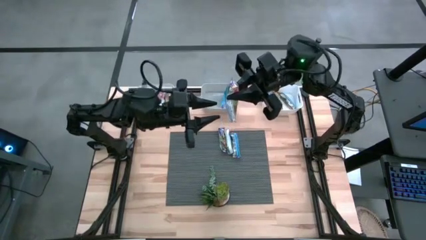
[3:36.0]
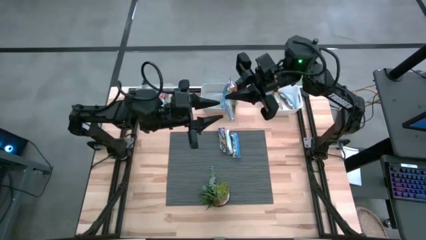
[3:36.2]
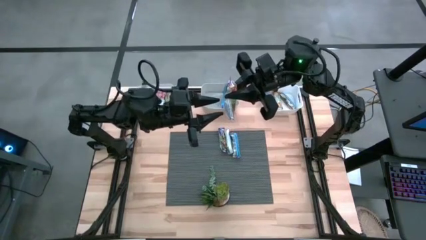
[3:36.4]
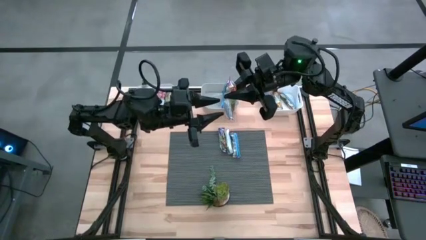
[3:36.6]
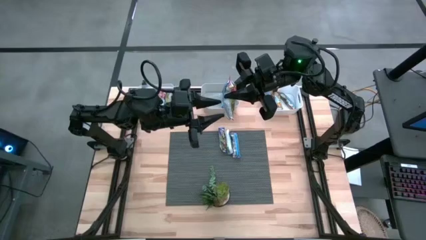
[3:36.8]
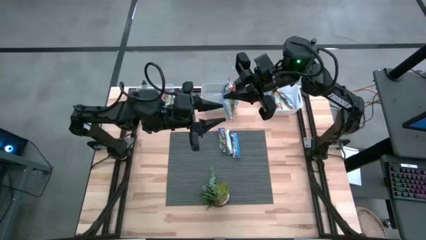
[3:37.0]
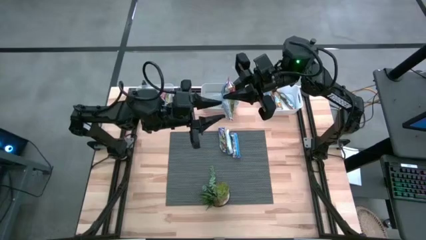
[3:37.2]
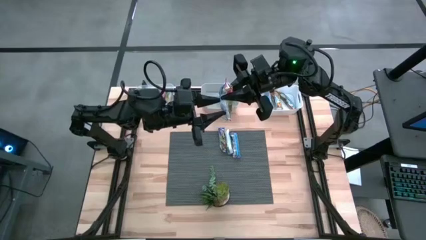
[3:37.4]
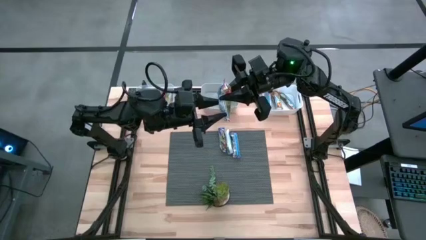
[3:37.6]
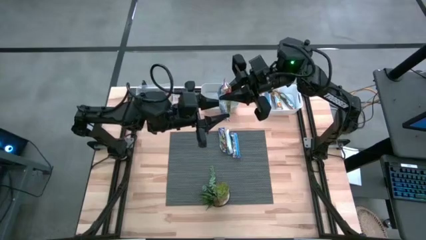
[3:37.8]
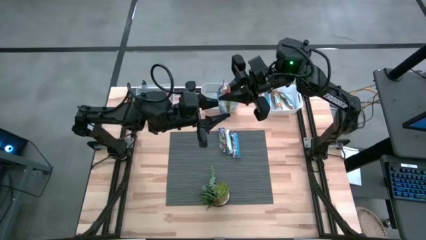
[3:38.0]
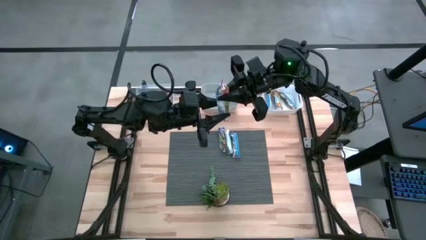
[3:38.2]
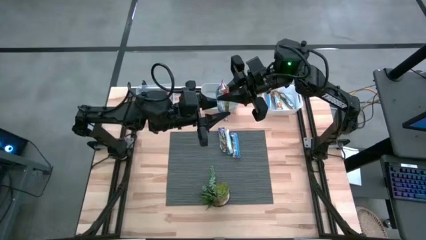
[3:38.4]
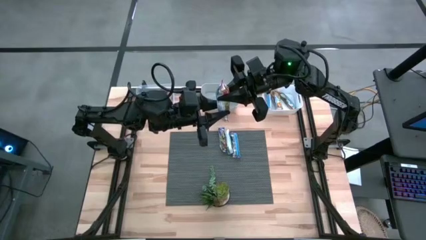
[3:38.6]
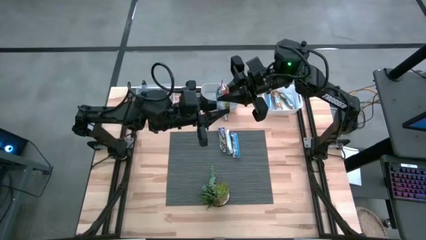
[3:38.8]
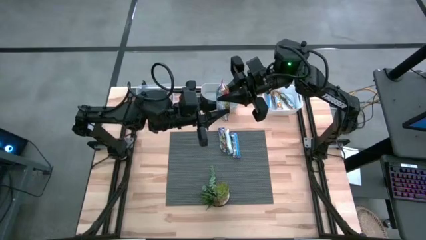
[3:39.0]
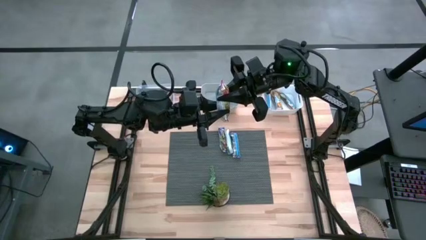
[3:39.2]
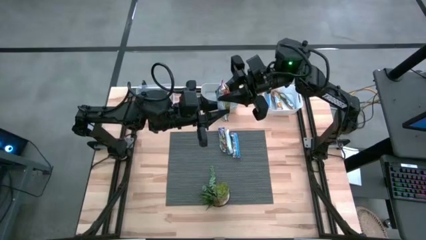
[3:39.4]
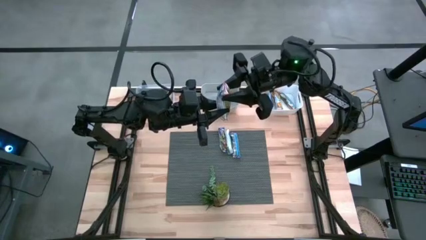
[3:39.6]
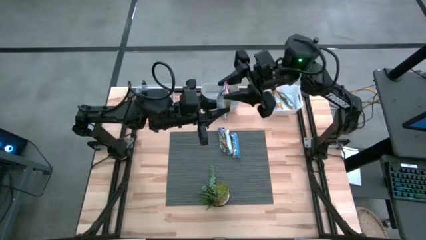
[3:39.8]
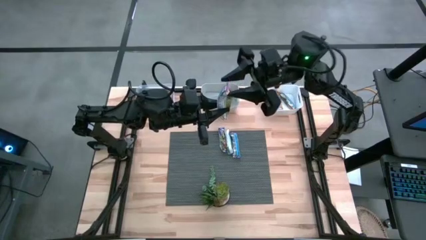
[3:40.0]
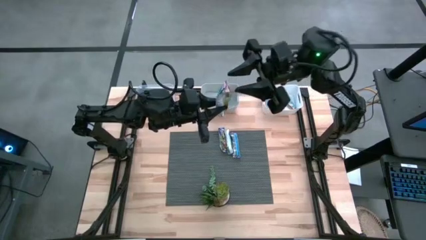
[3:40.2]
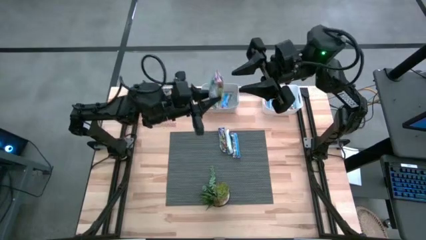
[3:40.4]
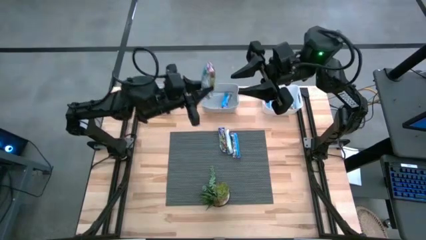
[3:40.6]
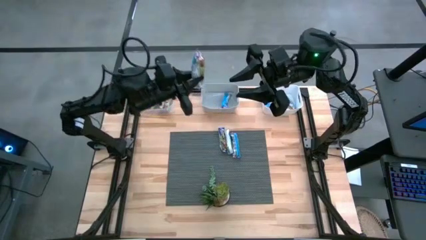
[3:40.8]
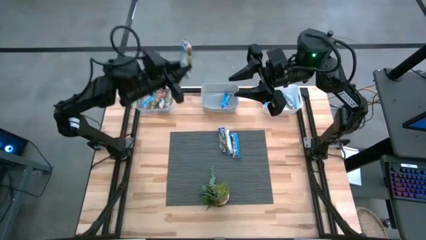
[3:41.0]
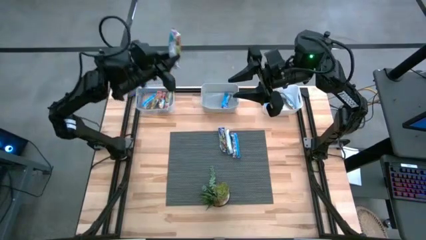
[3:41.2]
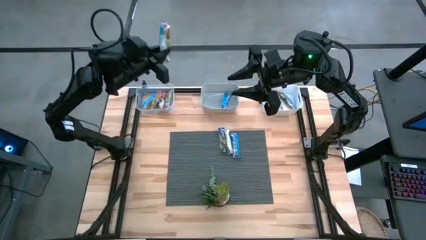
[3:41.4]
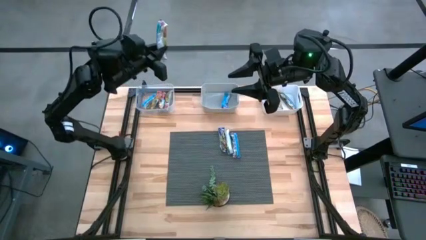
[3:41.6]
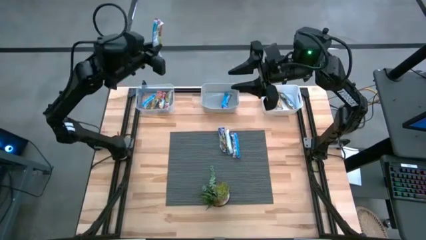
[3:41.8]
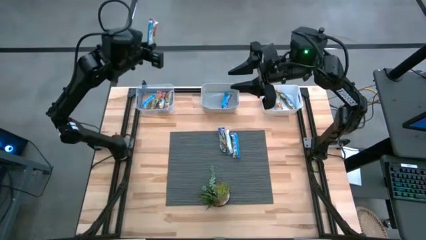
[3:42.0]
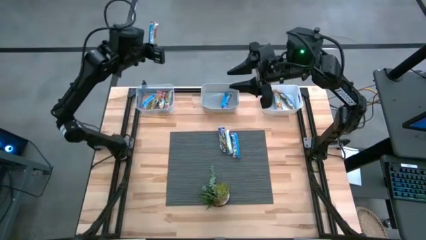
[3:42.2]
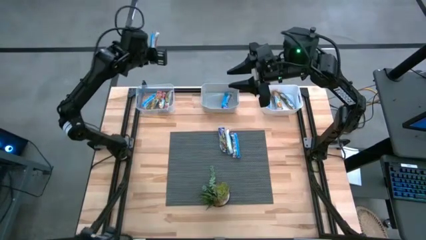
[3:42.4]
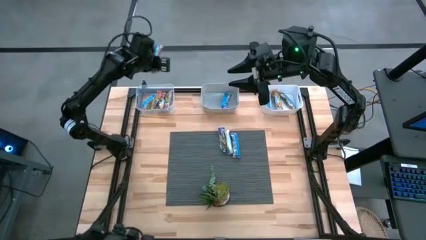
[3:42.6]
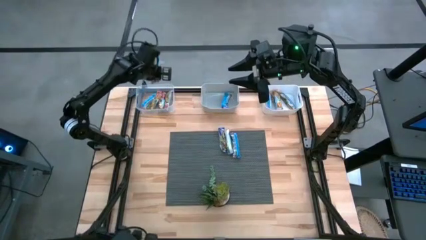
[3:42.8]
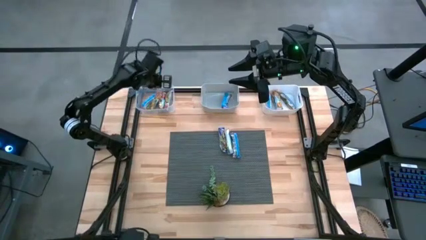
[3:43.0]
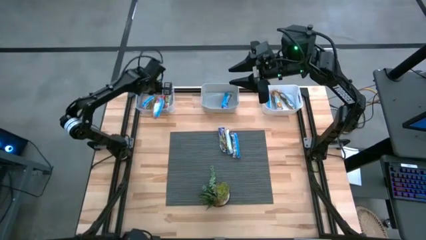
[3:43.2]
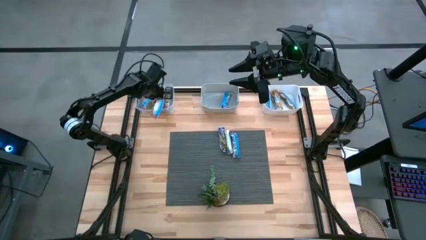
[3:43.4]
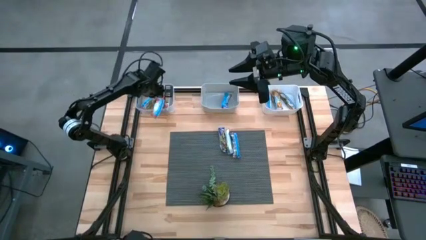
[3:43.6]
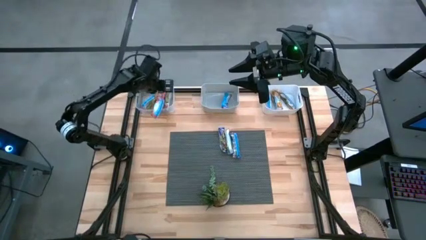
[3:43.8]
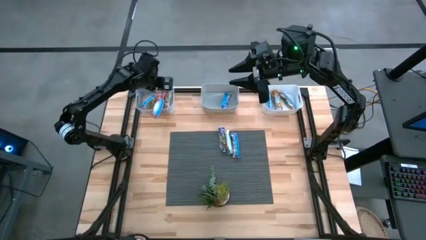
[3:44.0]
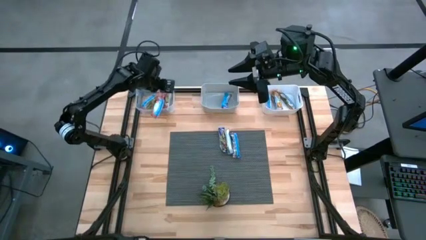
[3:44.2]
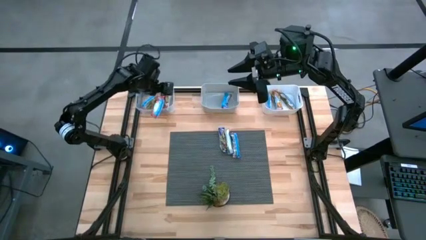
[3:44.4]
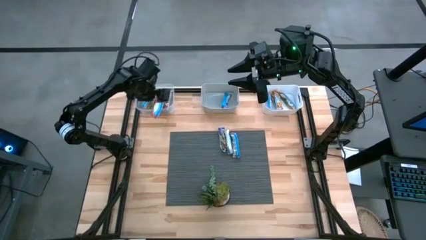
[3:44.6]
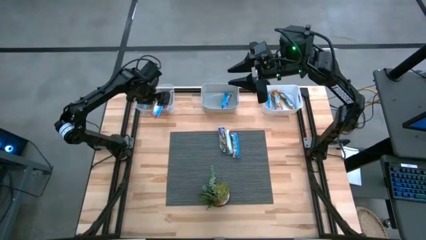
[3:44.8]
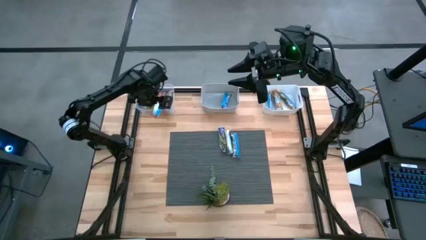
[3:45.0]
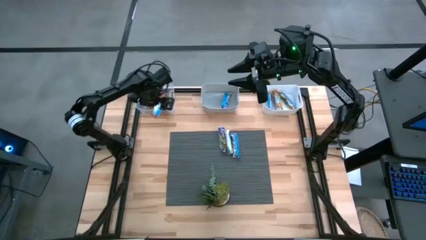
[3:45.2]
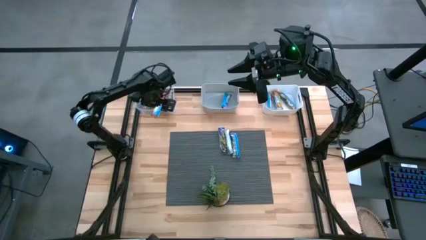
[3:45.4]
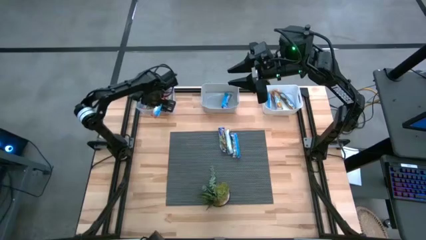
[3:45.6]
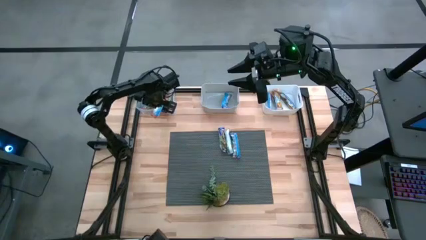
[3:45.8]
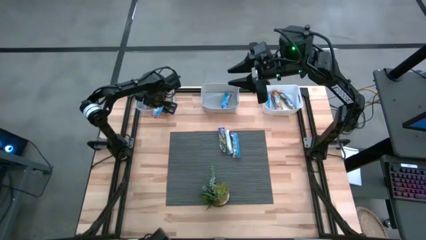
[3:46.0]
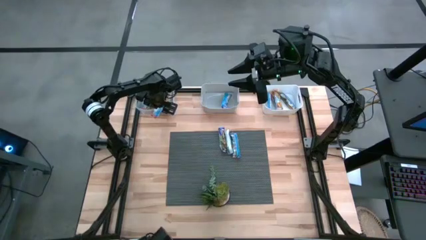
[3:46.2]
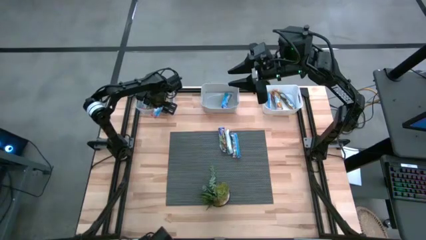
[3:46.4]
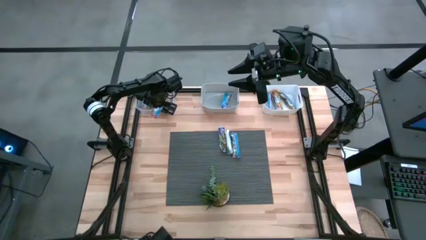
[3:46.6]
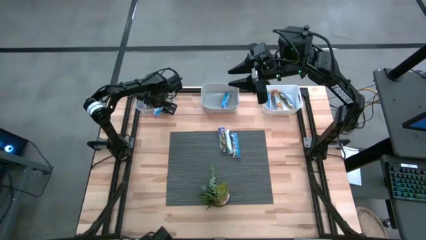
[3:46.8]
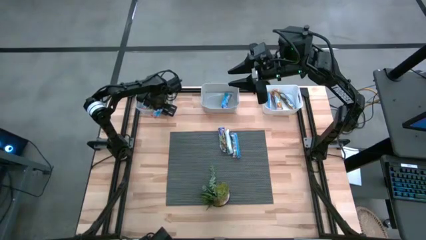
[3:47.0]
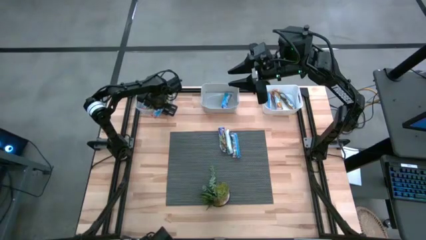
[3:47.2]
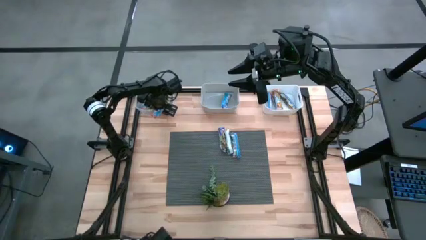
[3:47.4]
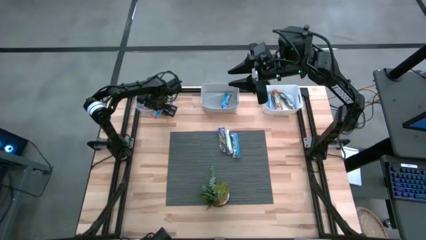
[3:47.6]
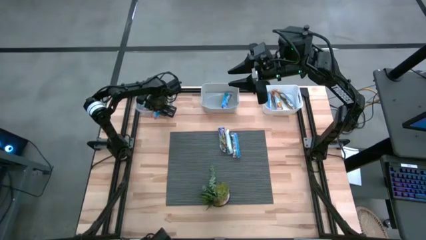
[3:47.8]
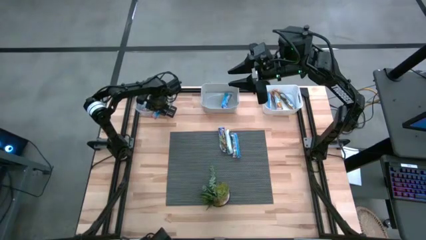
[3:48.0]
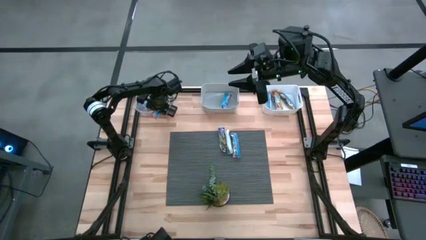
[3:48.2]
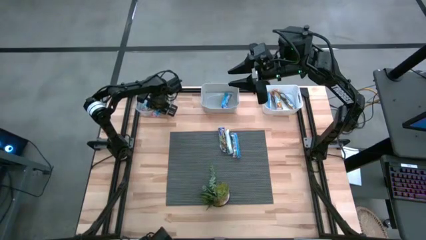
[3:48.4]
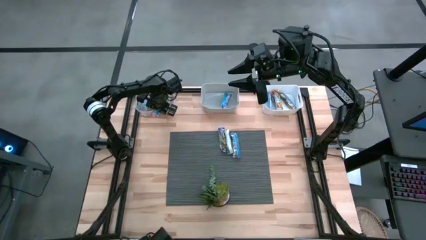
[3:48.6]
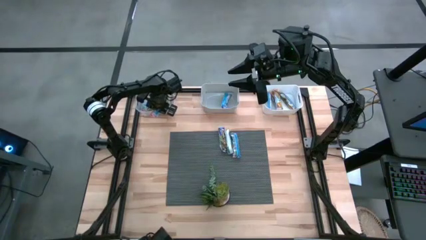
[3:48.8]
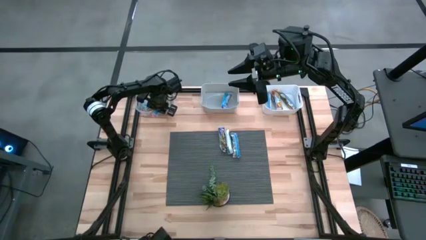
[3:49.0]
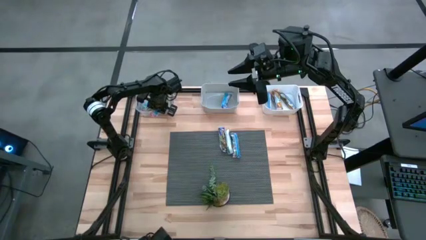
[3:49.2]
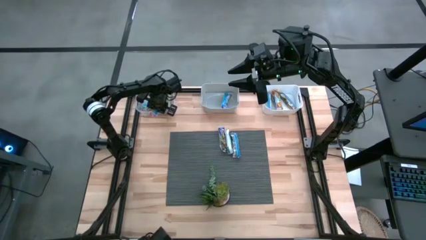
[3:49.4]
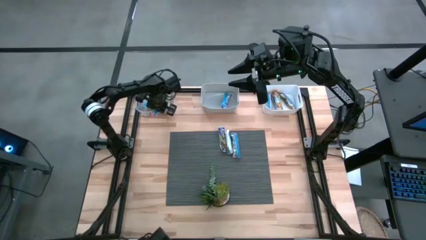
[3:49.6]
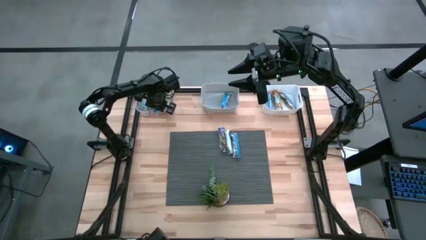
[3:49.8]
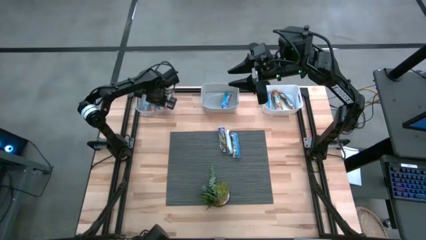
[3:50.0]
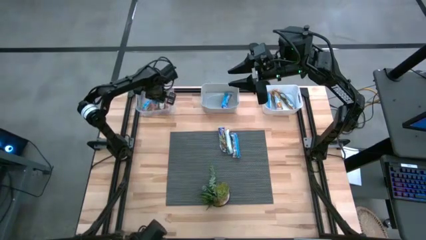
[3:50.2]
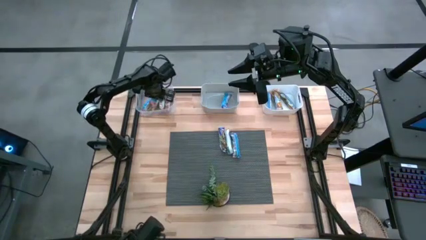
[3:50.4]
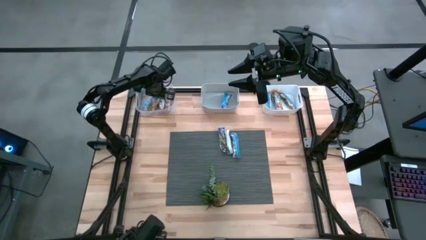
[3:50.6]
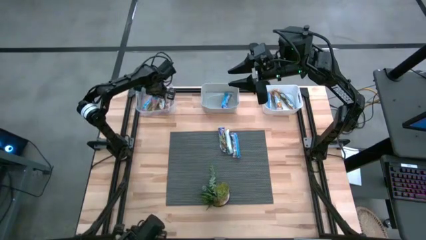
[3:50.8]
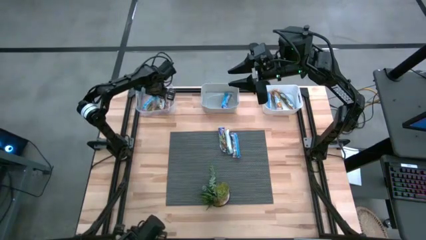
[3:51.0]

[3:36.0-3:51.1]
Task: Pick and place Granola Bars by type
Put the red granola bar into the transparent bin

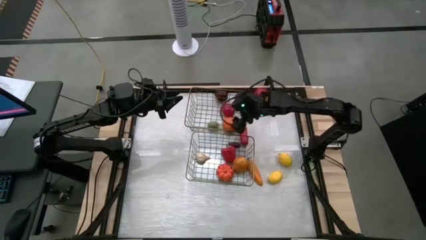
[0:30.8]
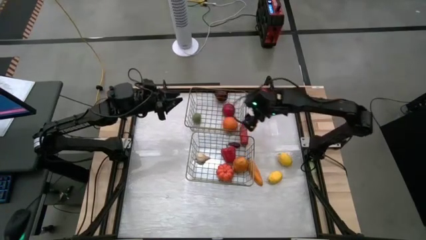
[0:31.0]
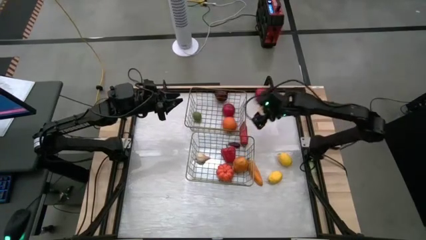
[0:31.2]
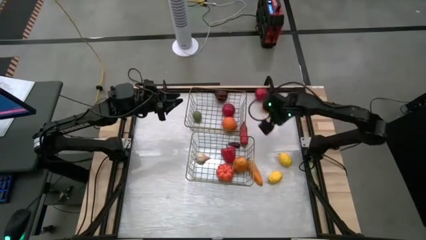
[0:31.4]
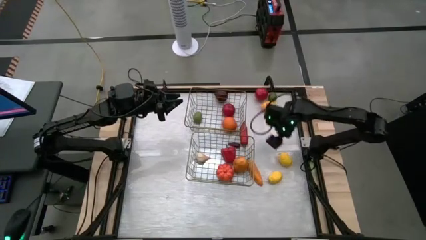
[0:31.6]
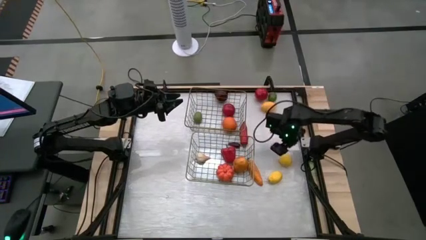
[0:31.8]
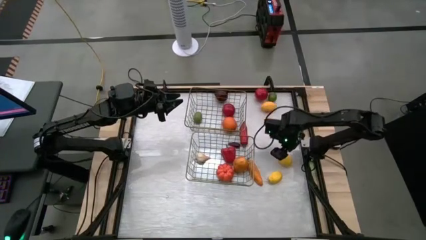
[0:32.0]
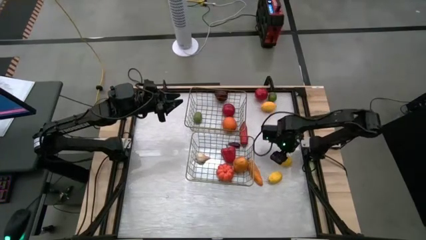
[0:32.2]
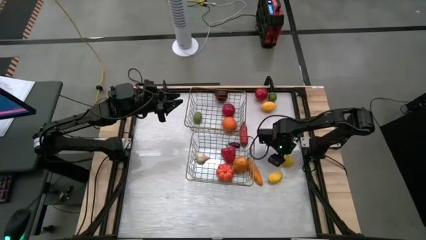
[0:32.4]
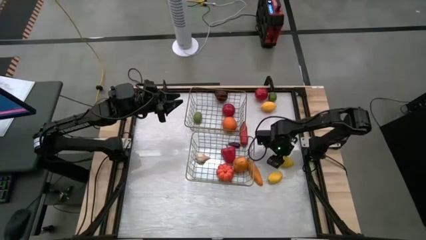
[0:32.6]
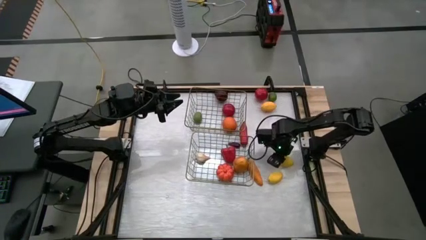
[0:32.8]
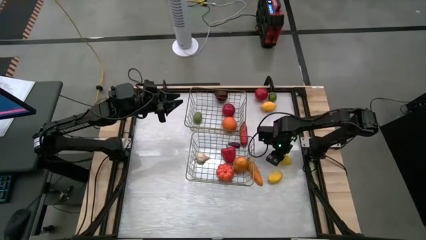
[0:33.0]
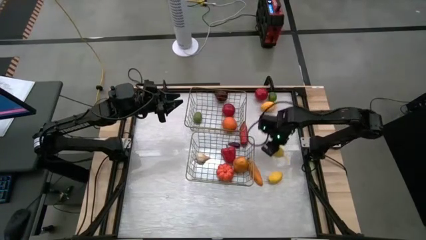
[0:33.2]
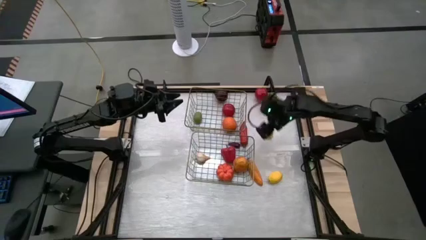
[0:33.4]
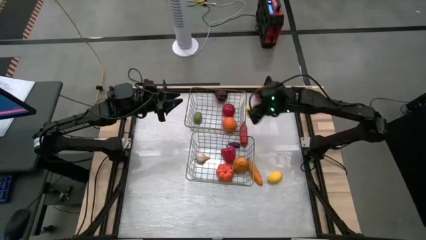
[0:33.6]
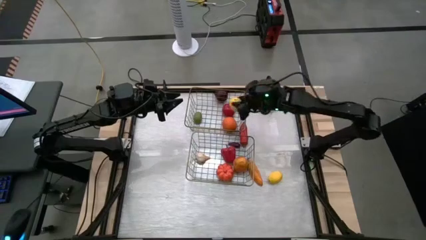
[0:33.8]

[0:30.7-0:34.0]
Task: Sort produce into baskets
Put the top yellow lemon fruit into the top wire basket
